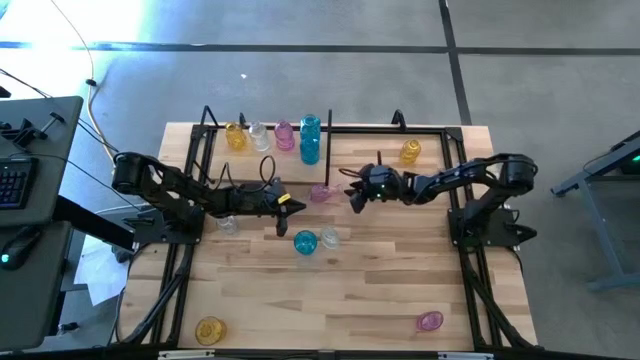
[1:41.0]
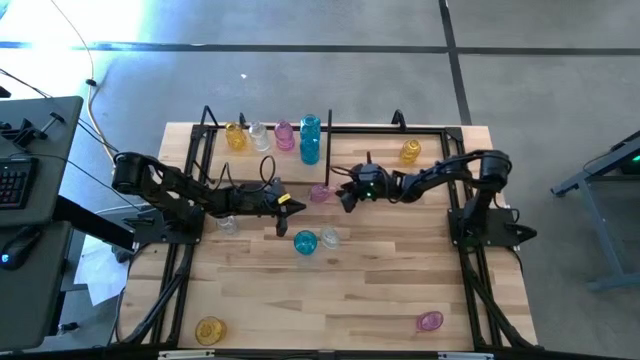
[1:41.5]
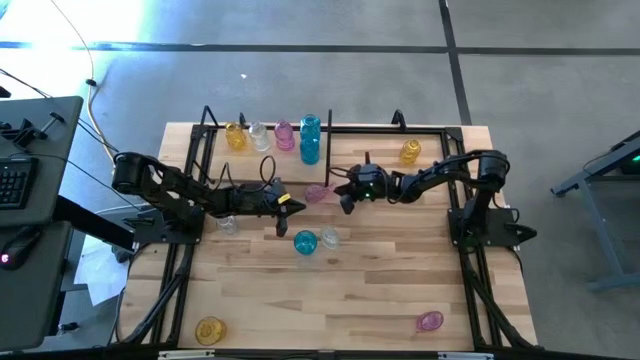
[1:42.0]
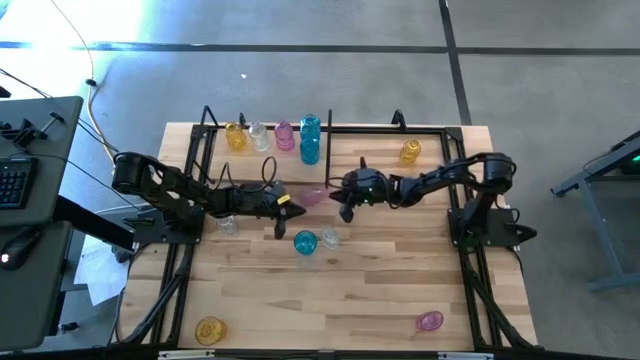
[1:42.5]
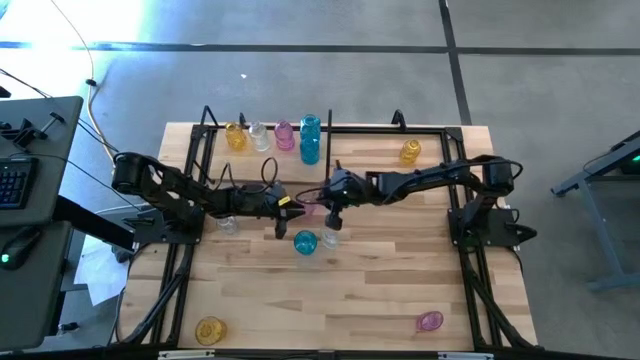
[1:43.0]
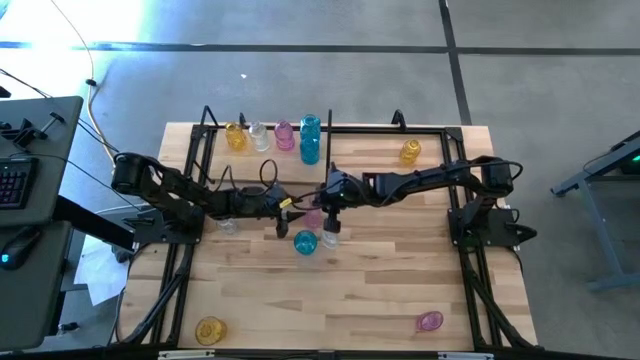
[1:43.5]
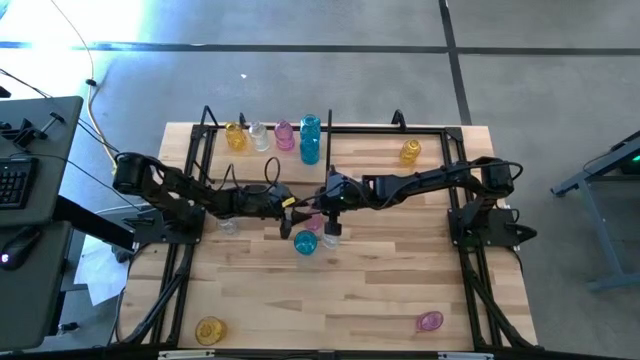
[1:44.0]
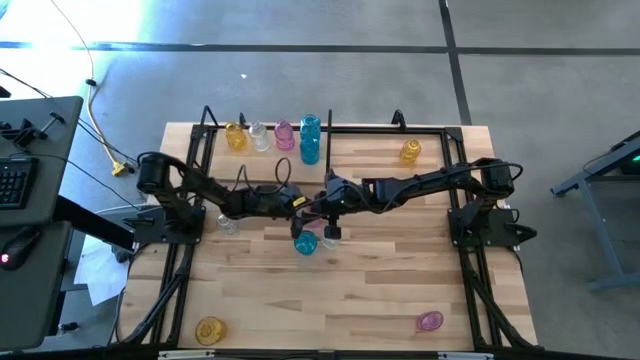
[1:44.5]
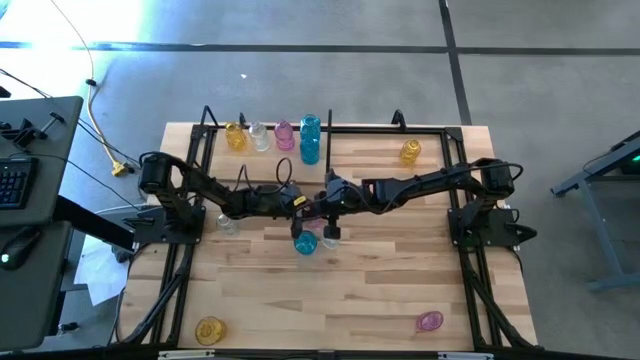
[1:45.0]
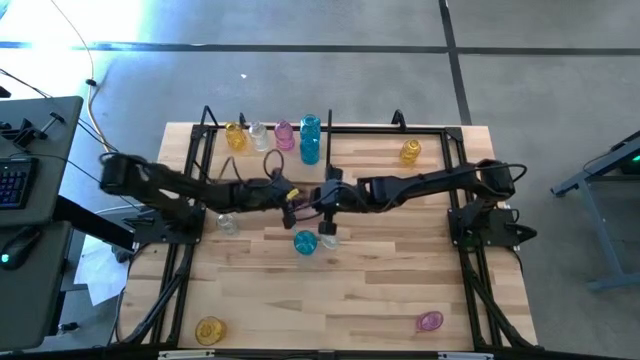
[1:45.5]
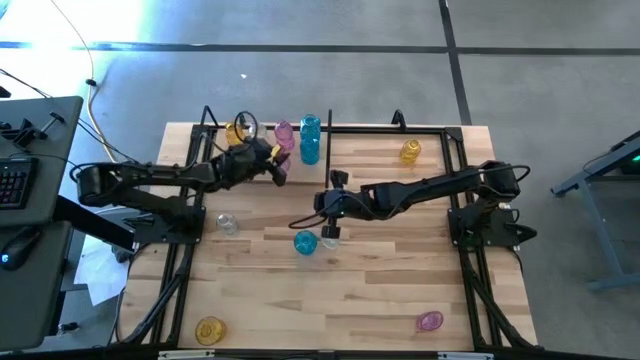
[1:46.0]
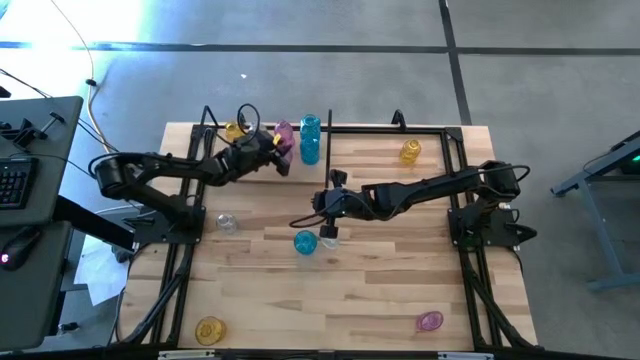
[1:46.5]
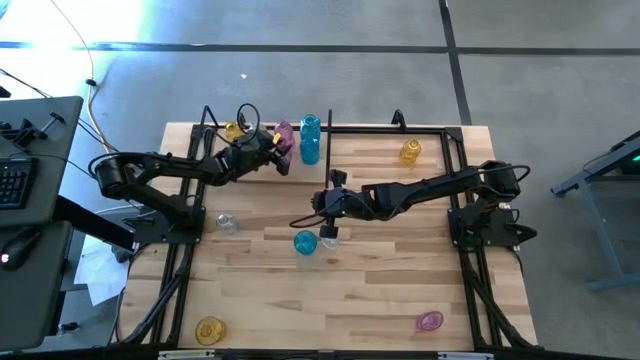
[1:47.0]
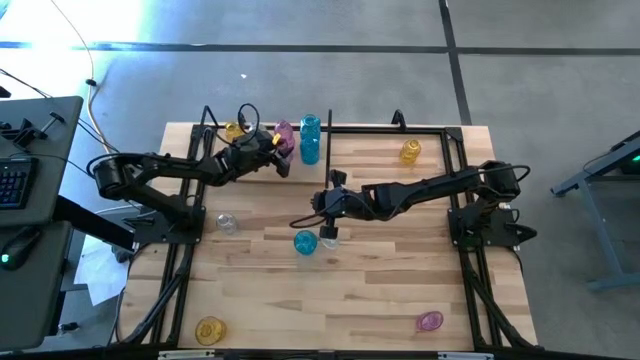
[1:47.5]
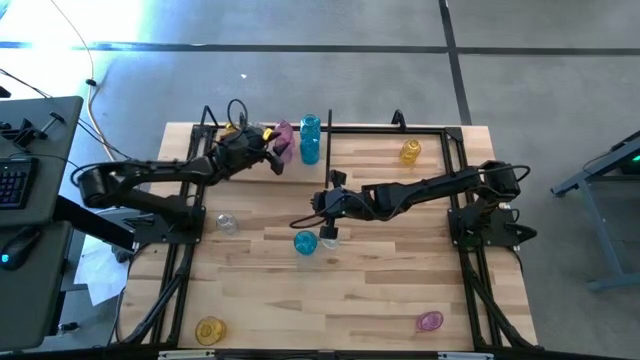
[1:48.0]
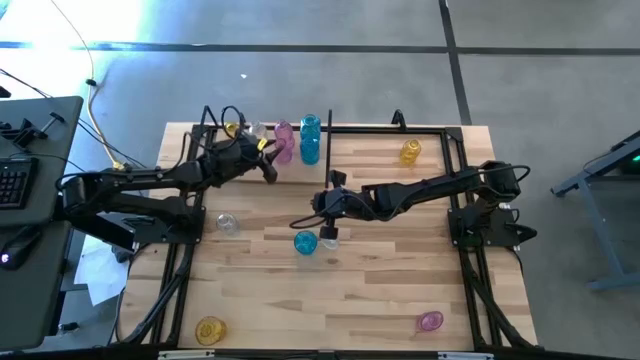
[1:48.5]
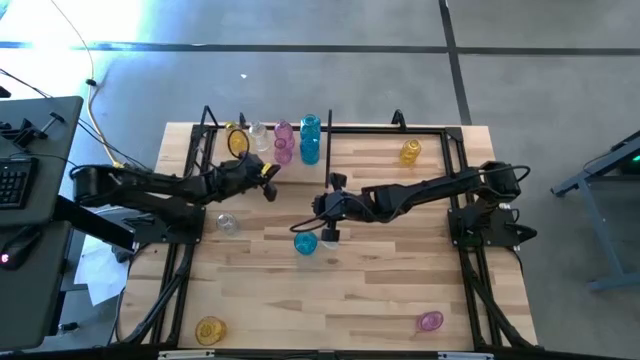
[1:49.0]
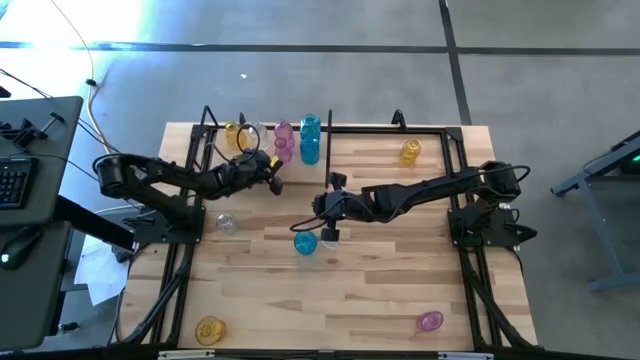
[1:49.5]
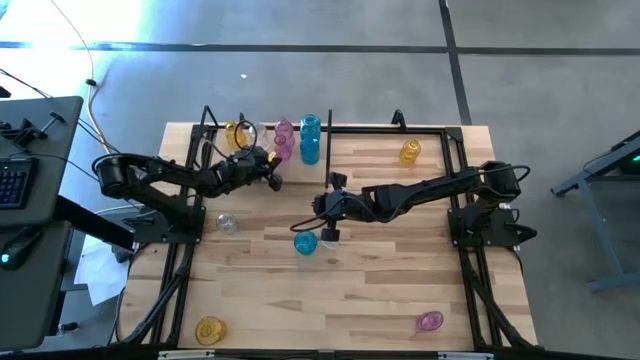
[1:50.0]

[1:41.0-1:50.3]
Task: sort vases onto shelf
Put the top purple flower vase aligned with the other purple flower vase on the shelf

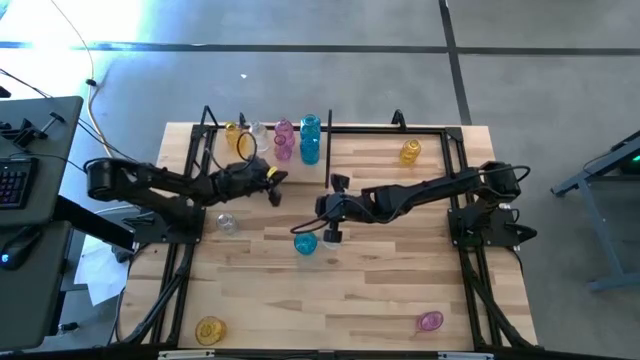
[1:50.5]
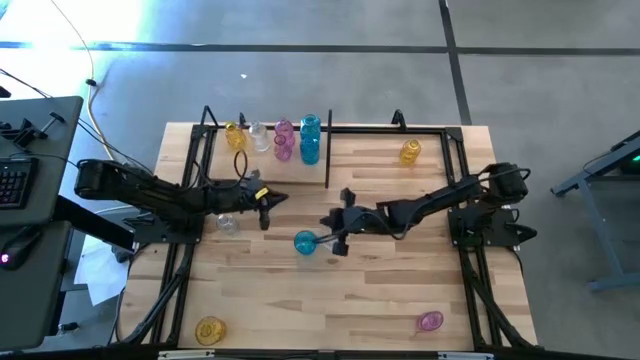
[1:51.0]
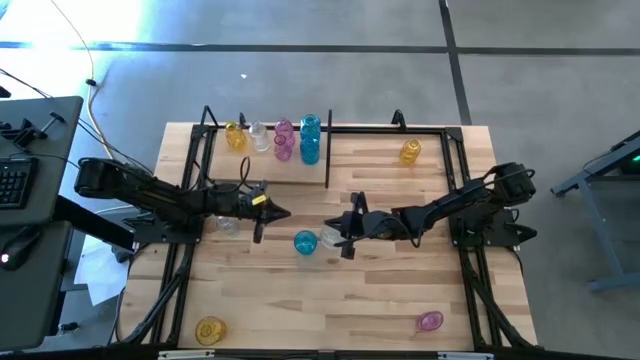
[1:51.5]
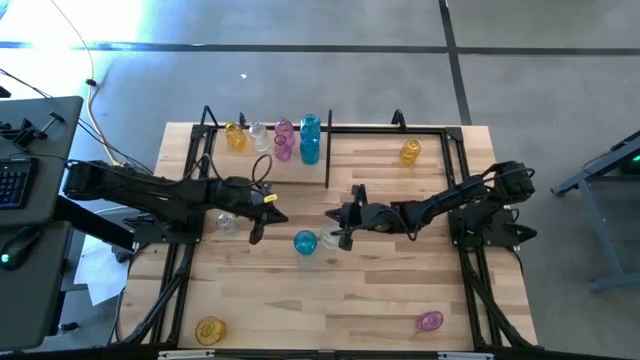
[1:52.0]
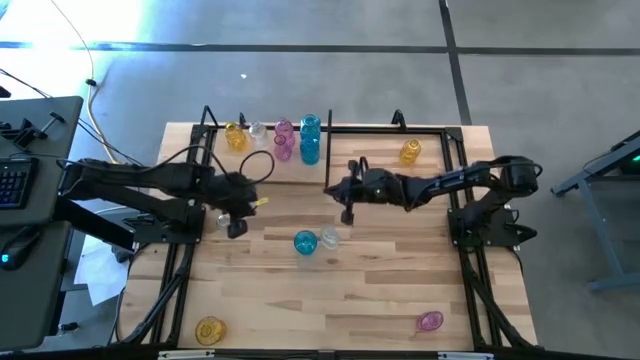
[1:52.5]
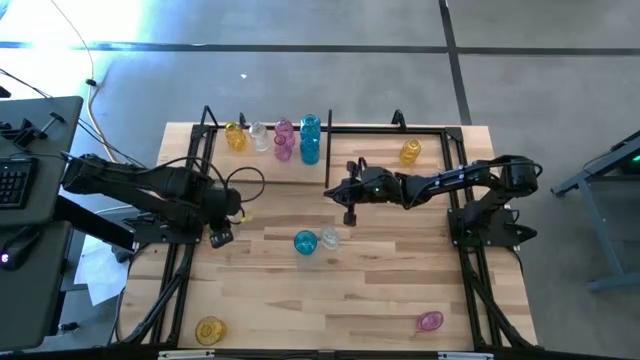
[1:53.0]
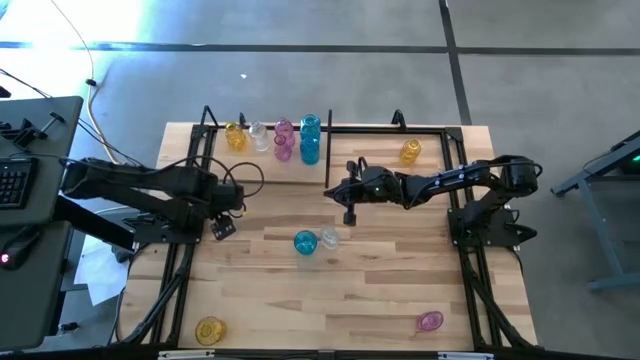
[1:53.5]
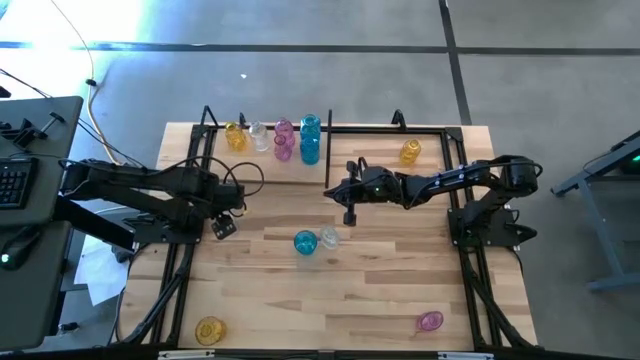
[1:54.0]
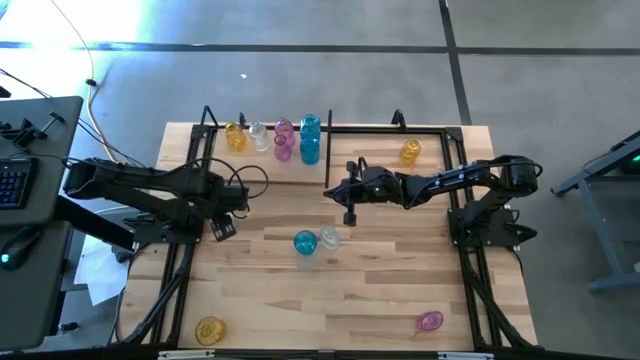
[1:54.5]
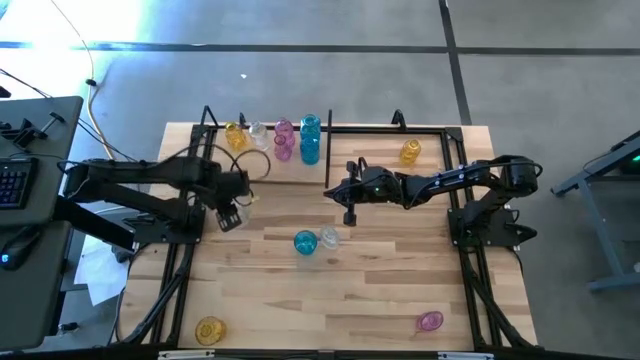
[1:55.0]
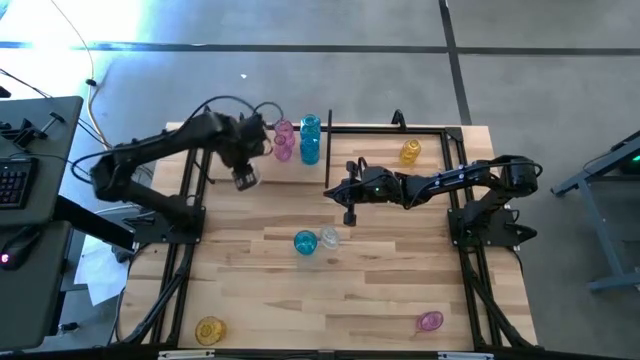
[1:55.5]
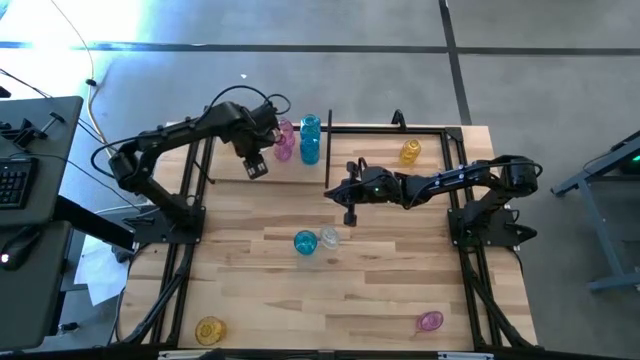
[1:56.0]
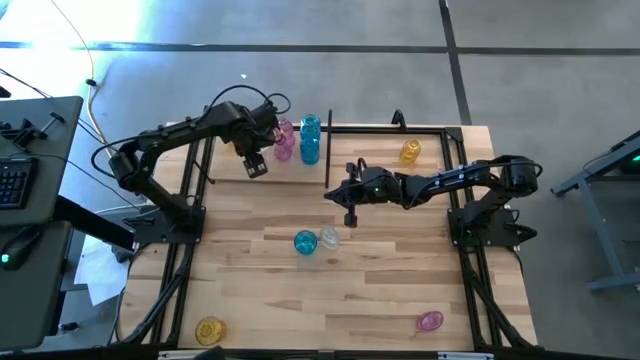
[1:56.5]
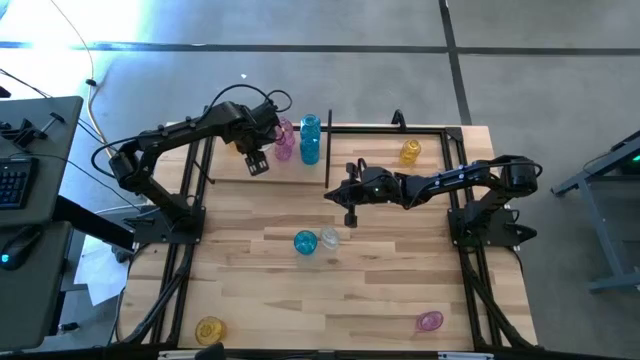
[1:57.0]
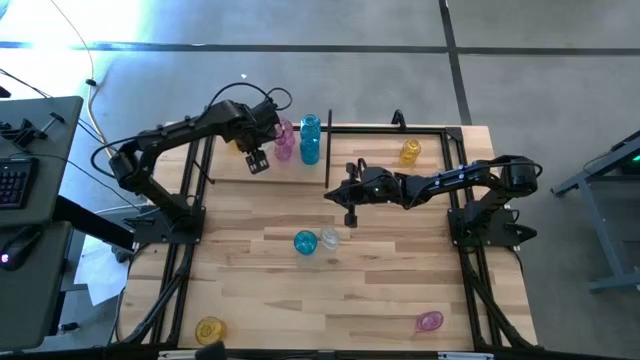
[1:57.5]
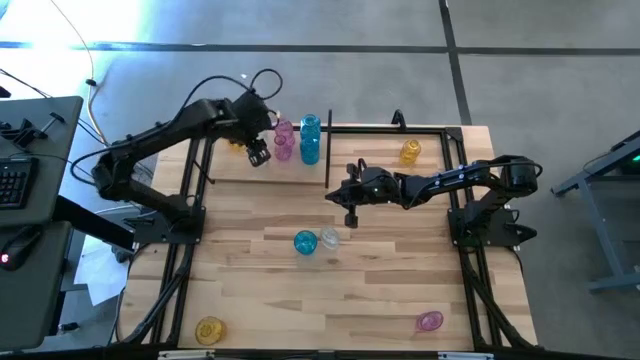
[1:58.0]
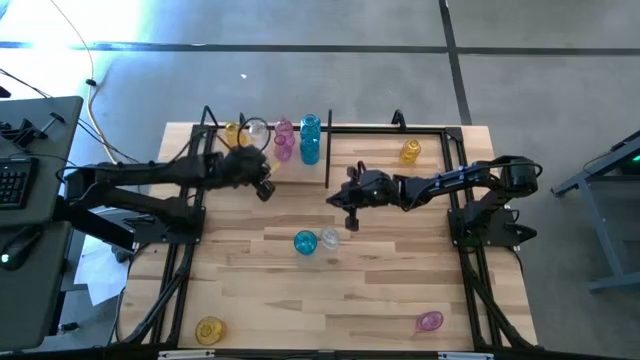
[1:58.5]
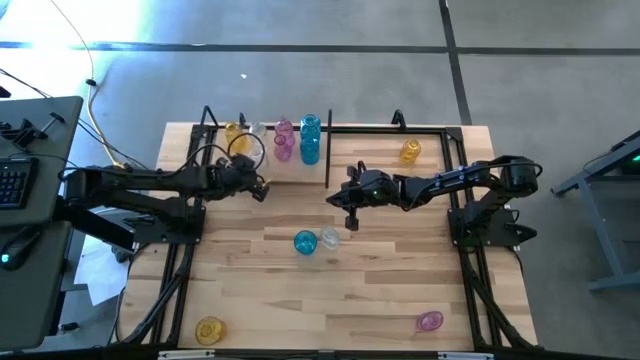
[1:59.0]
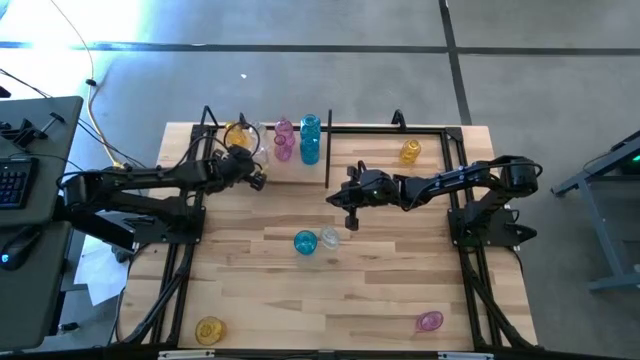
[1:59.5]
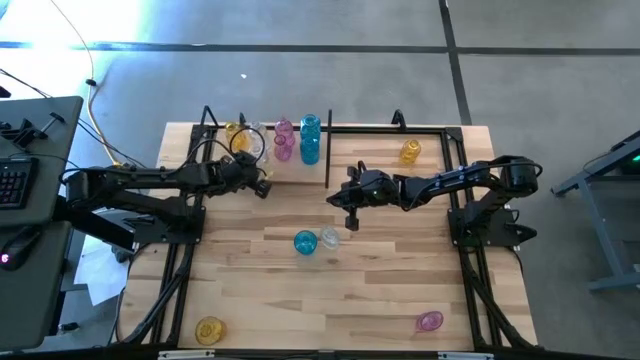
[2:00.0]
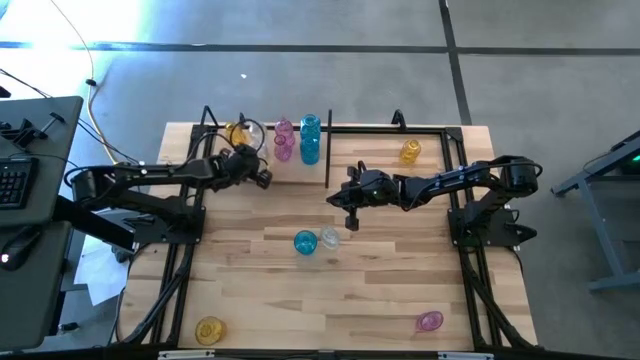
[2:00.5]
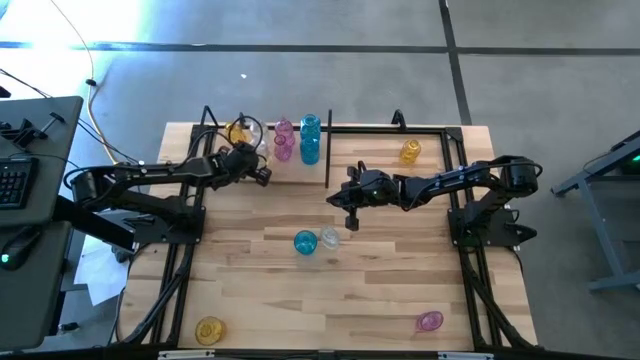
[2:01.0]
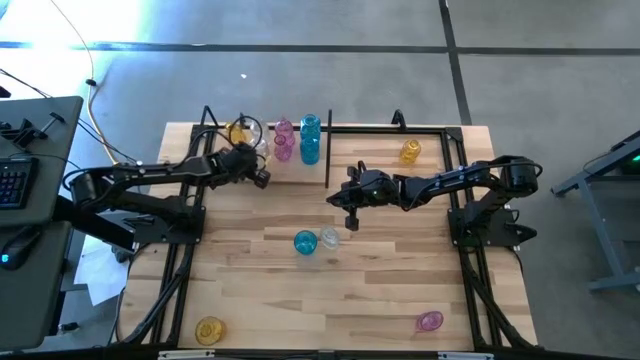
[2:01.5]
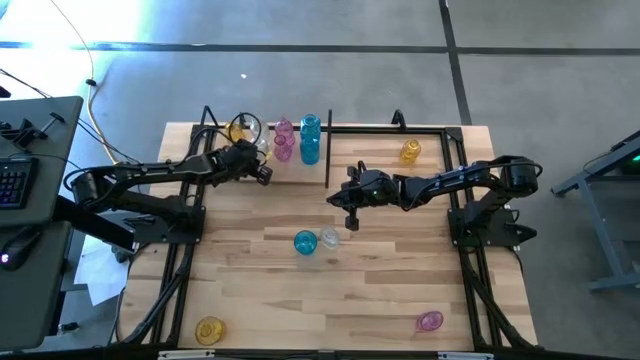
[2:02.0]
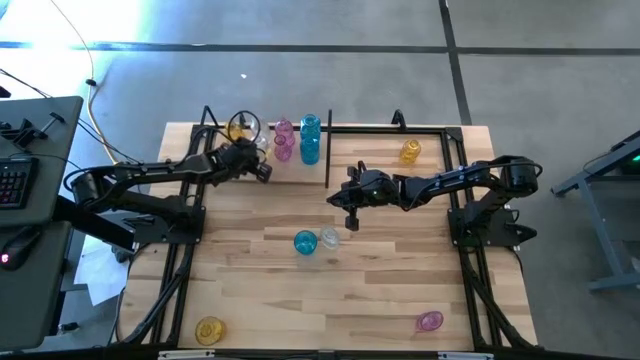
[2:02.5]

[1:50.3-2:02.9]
Put the left transparent flower vase aligned with the other transparent flower vase on the shelf
